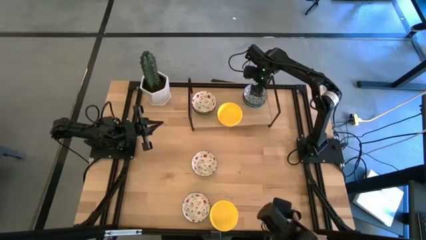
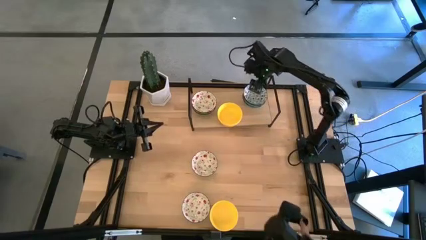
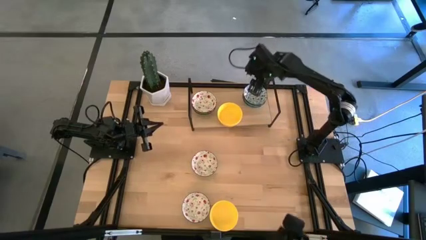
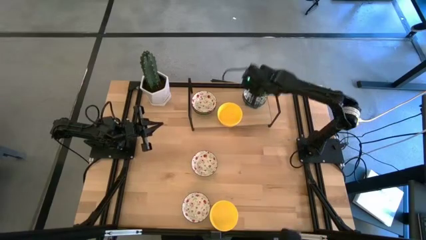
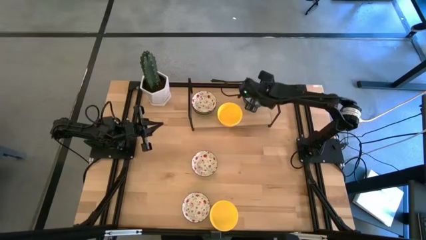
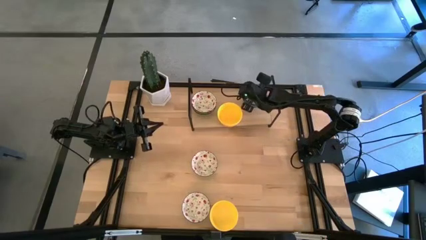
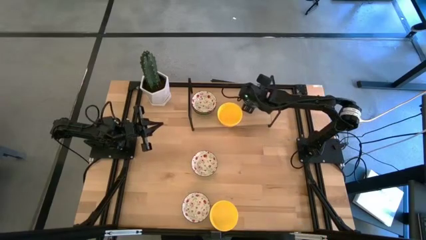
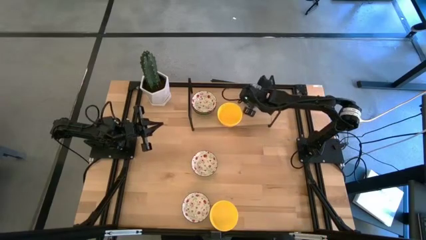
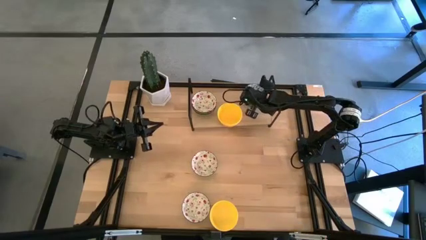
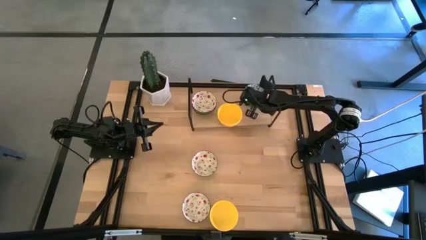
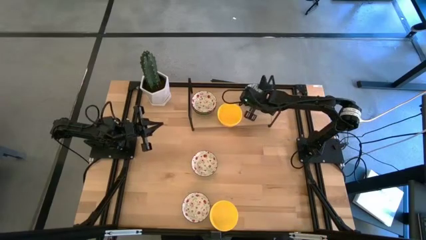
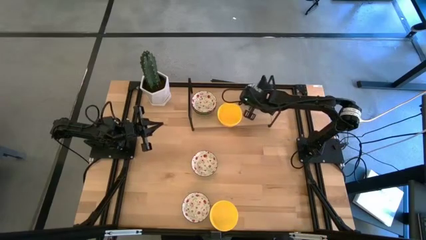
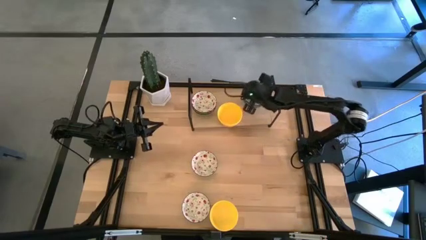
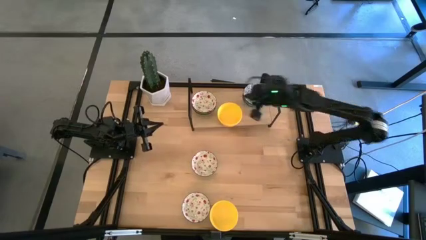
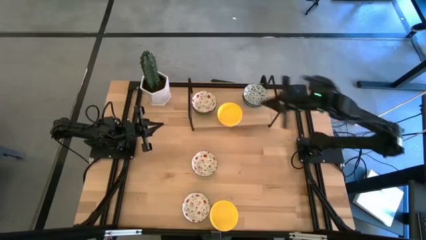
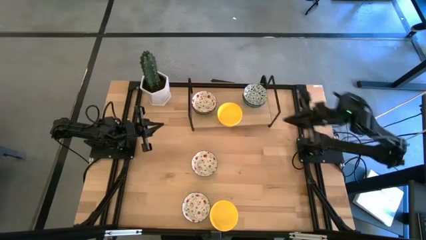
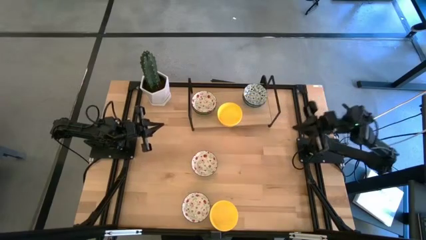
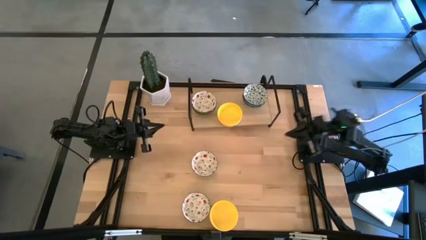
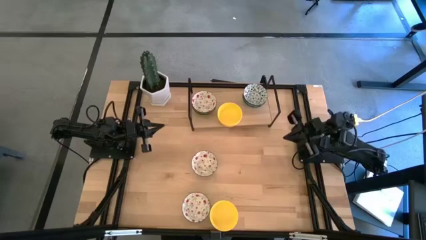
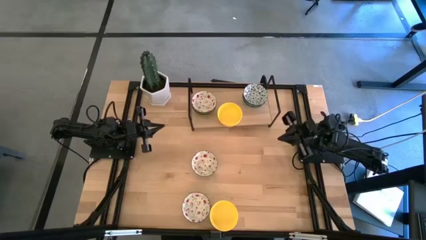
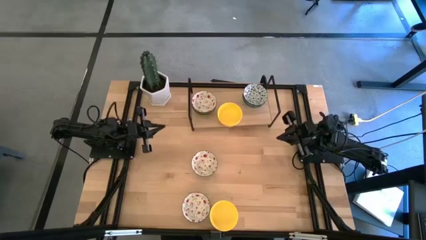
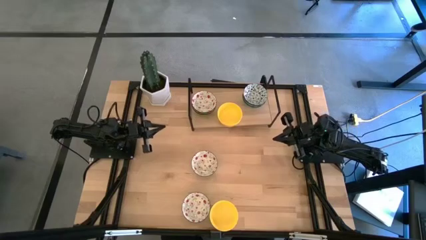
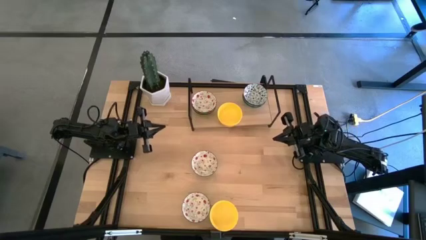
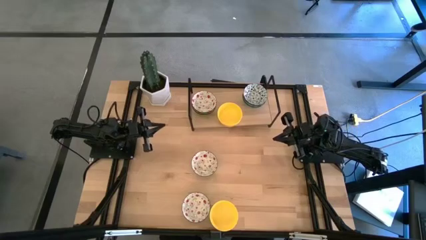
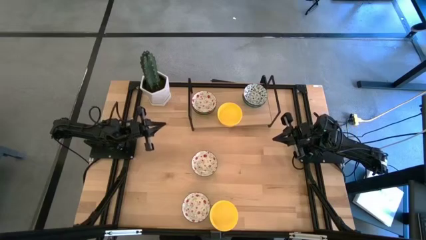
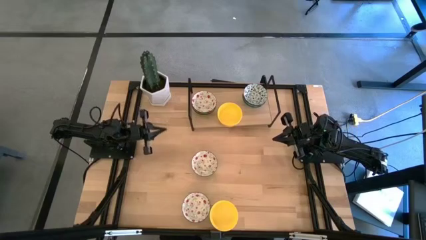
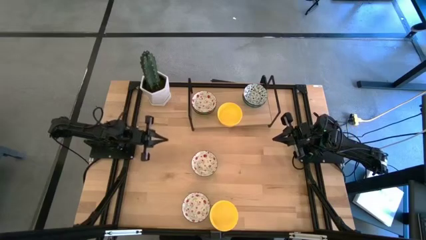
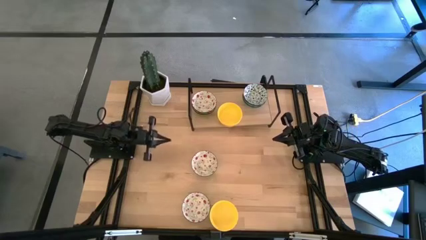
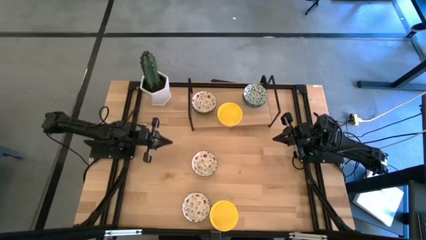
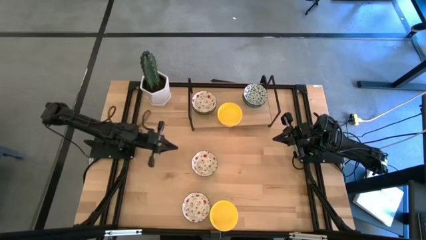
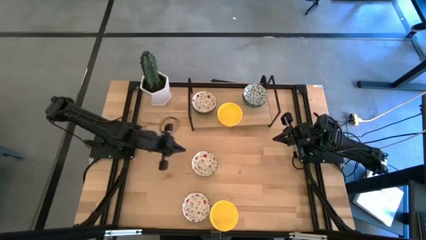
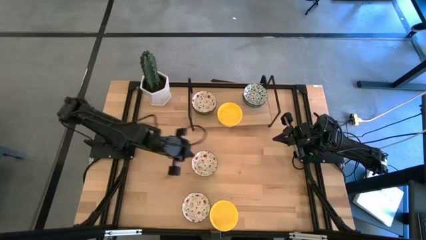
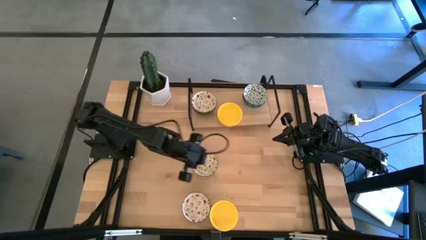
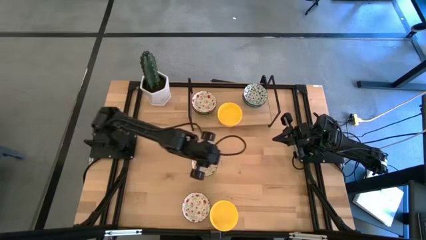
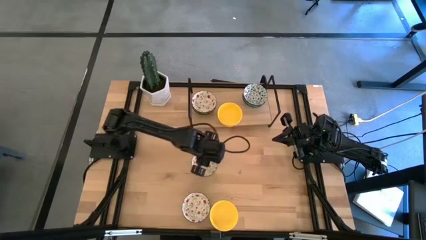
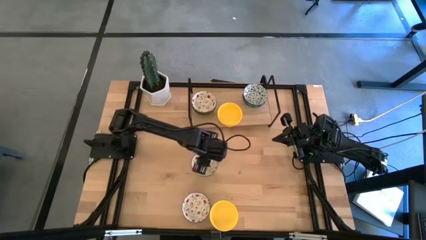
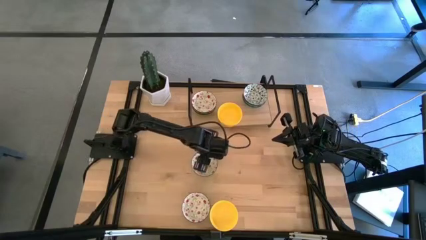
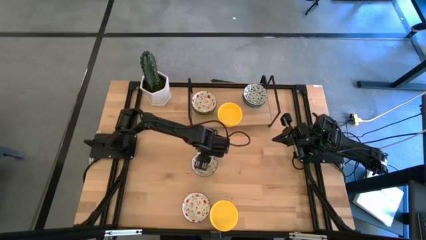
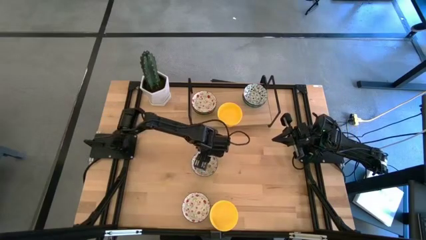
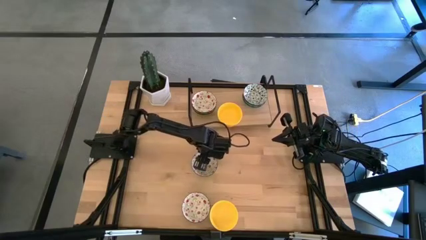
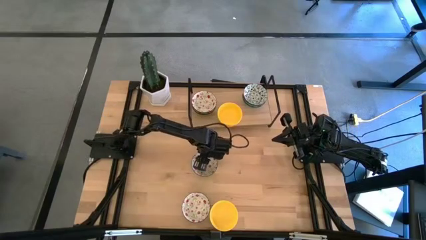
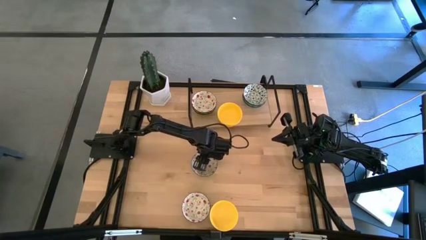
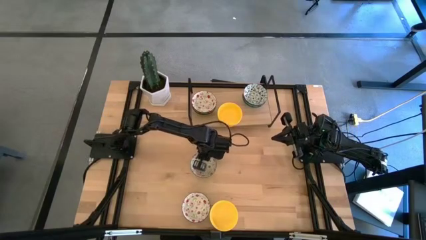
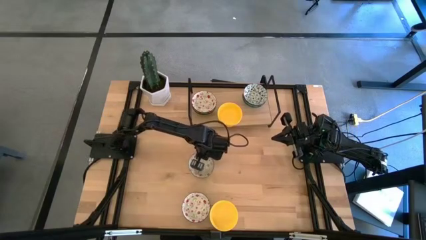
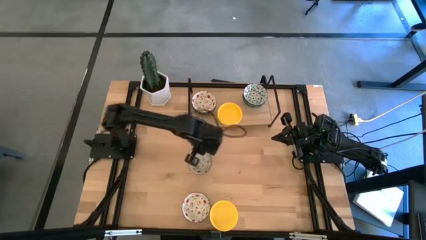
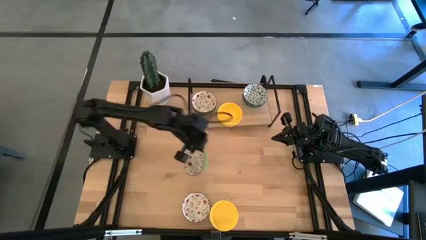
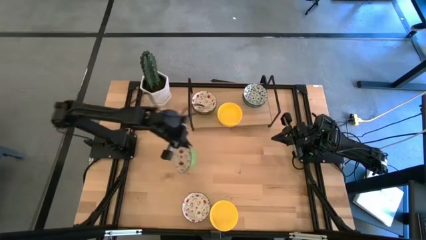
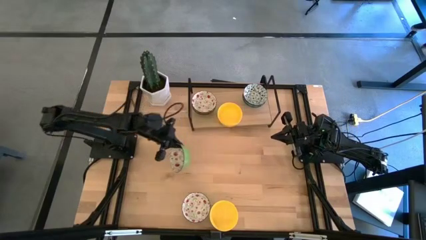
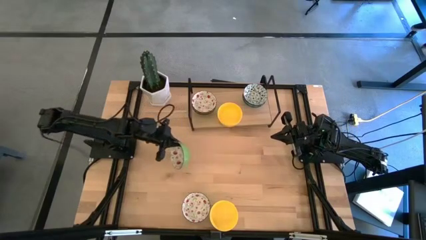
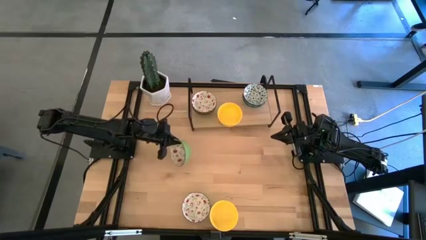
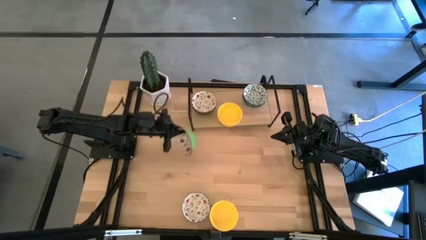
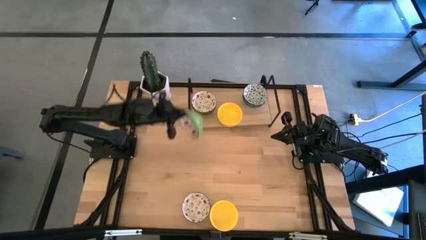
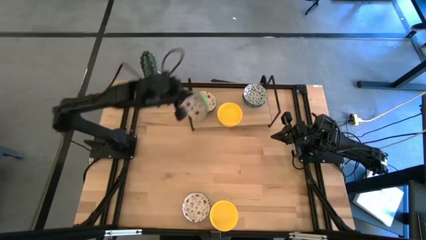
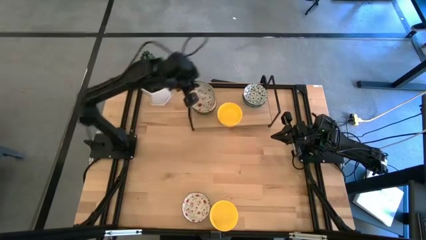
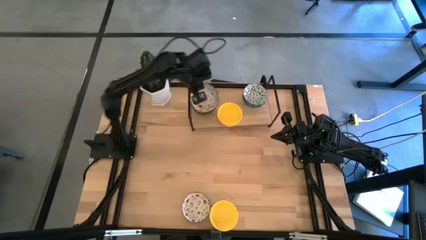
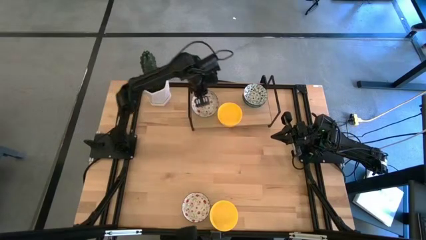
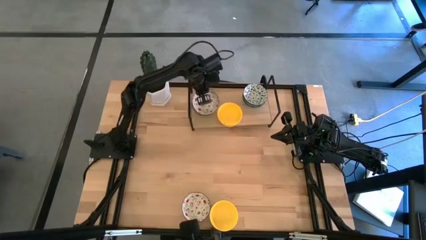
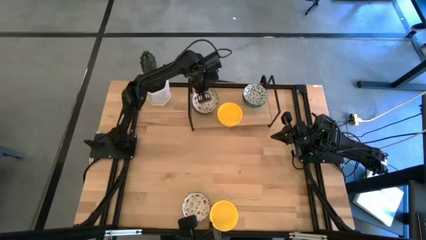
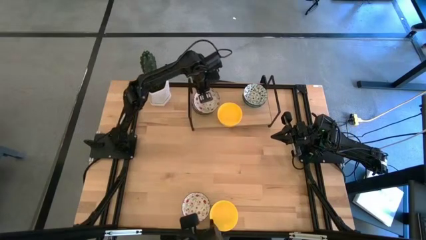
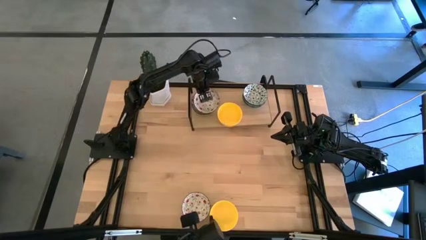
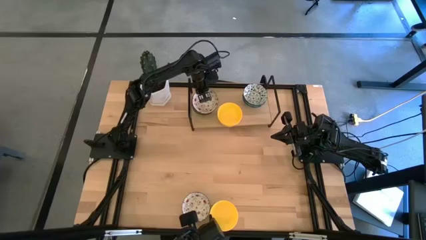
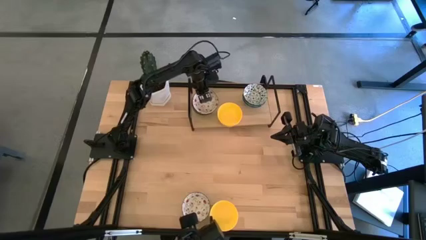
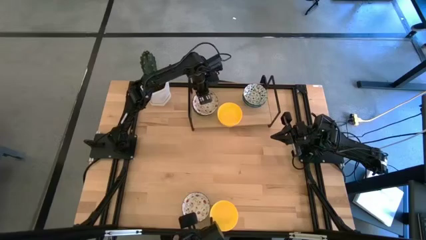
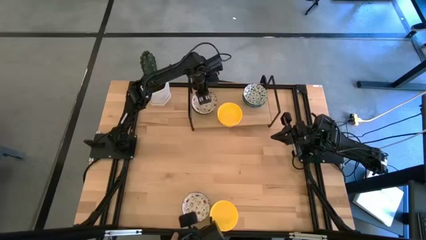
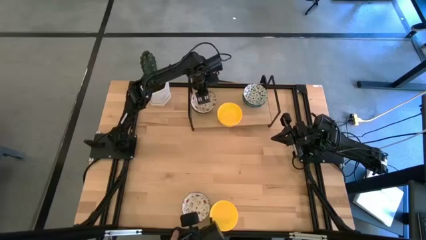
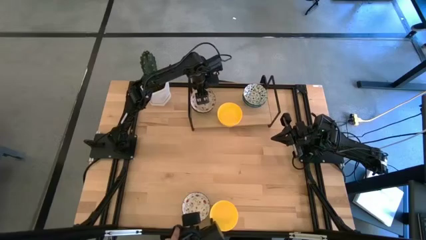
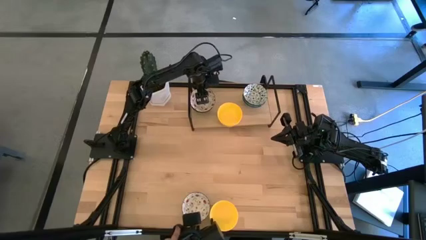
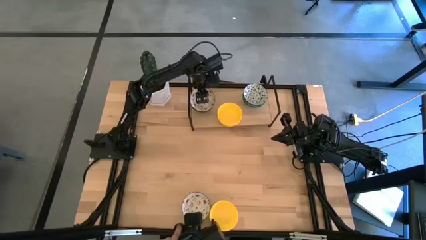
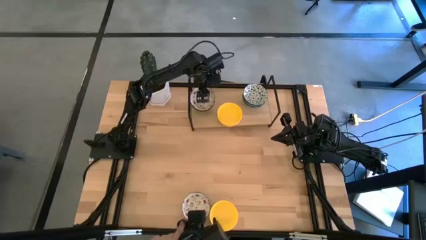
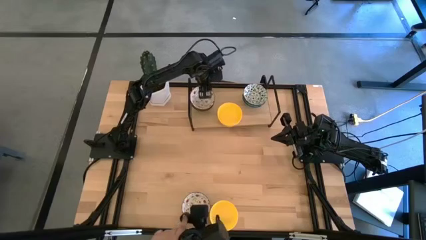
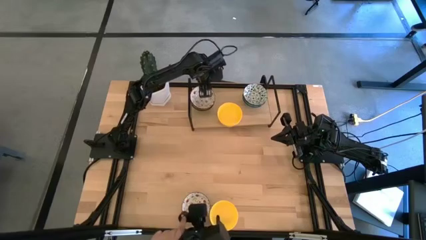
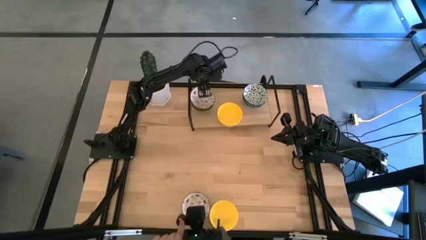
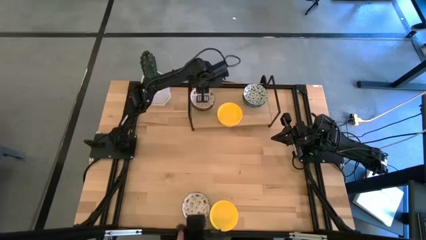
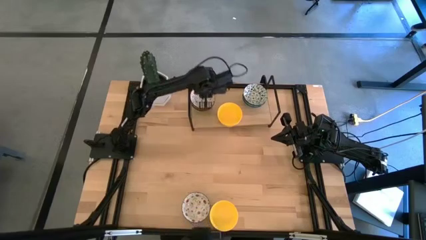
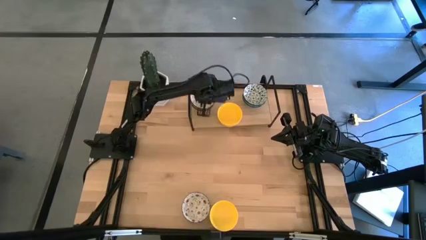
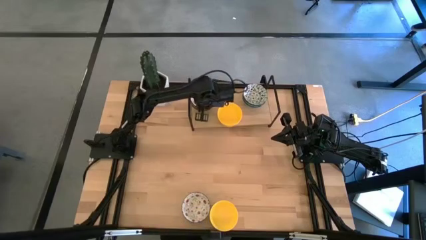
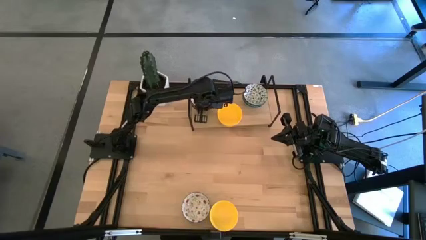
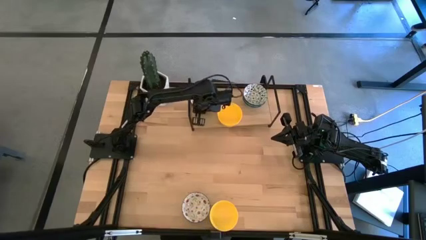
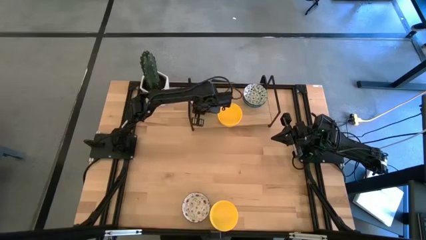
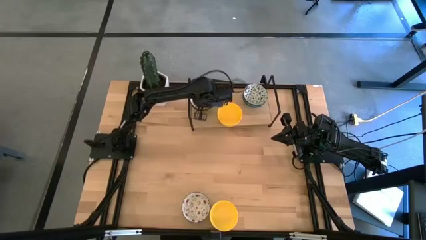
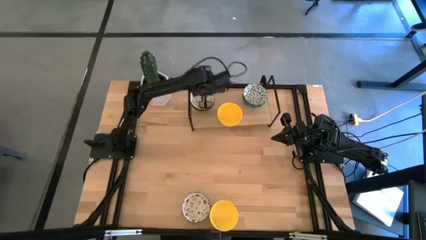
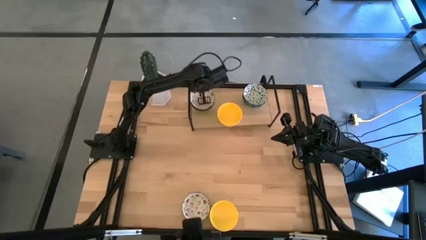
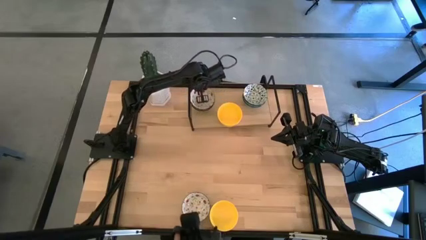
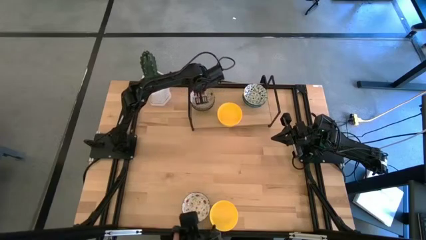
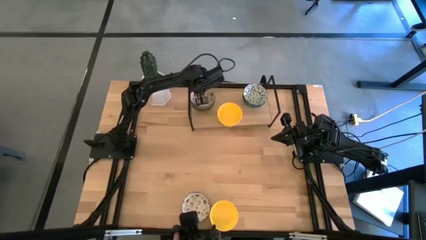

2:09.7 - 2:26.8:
Task: Pick & Place Mini bowls
Stack the green patterned bowl on the green patterned bowl on the shelf
